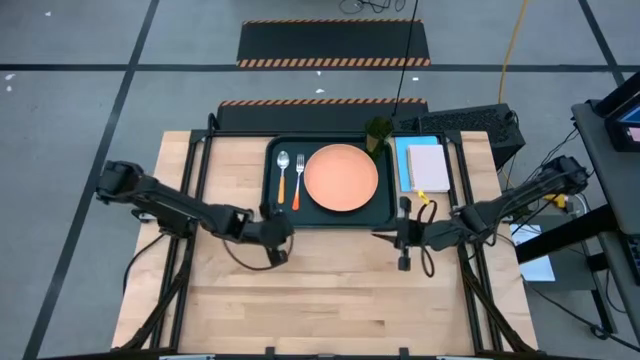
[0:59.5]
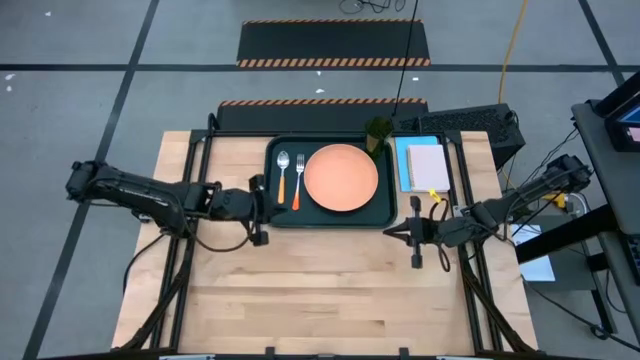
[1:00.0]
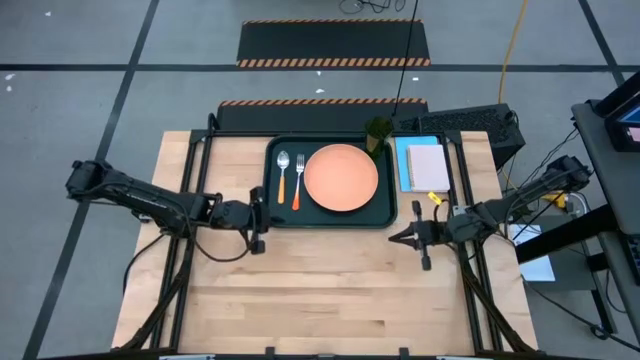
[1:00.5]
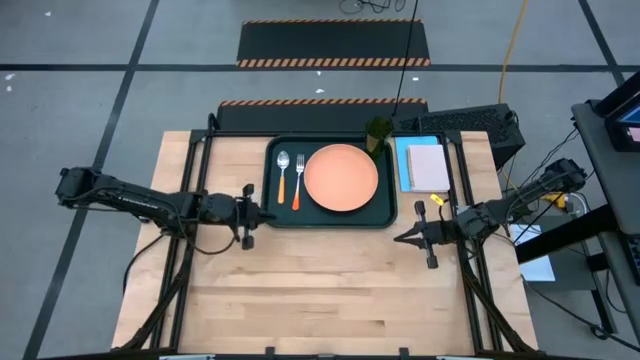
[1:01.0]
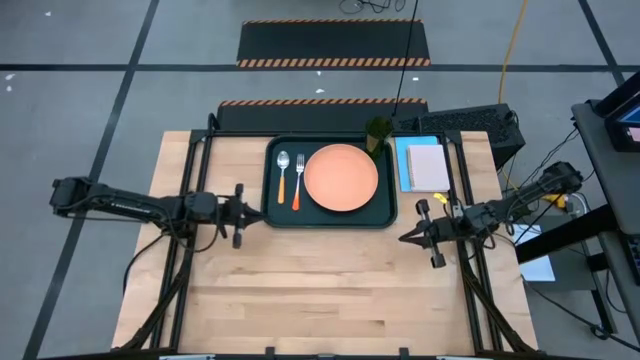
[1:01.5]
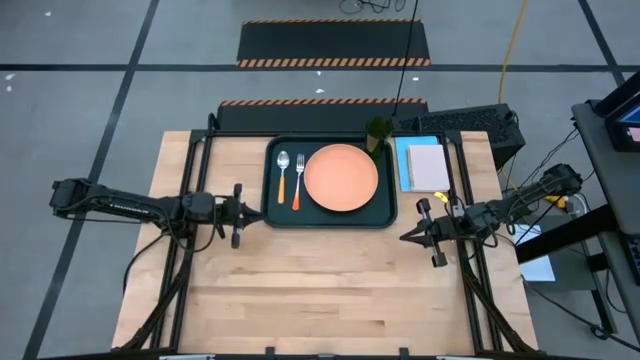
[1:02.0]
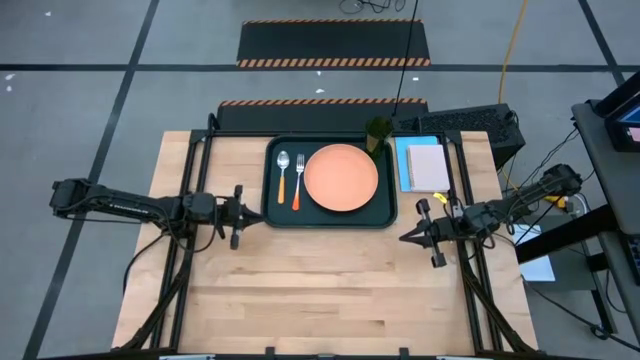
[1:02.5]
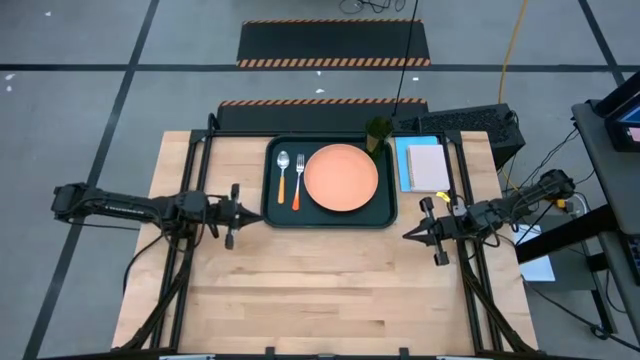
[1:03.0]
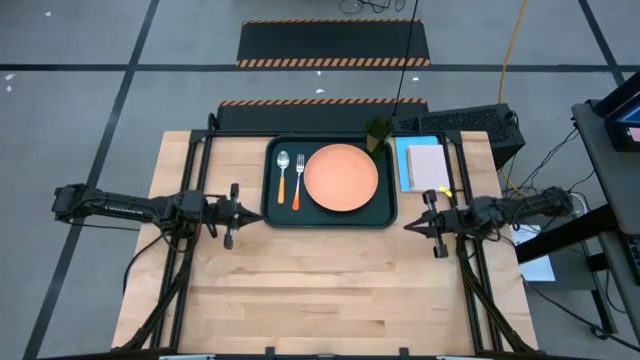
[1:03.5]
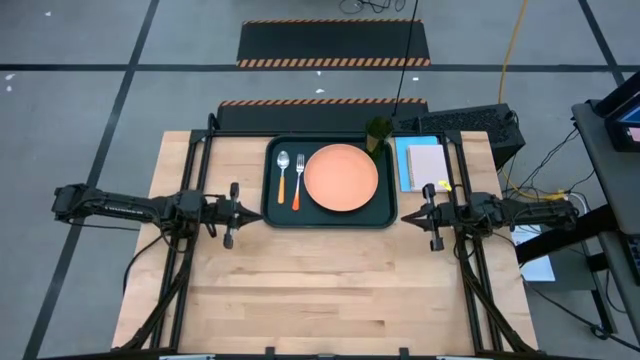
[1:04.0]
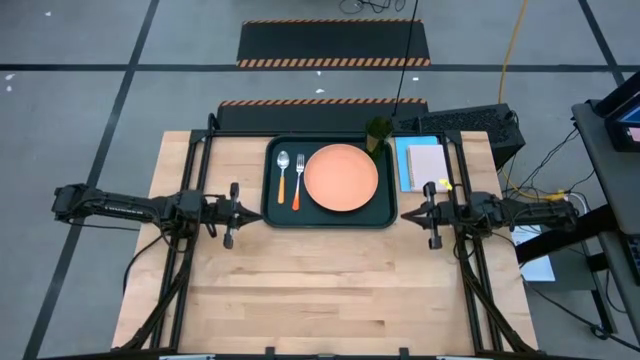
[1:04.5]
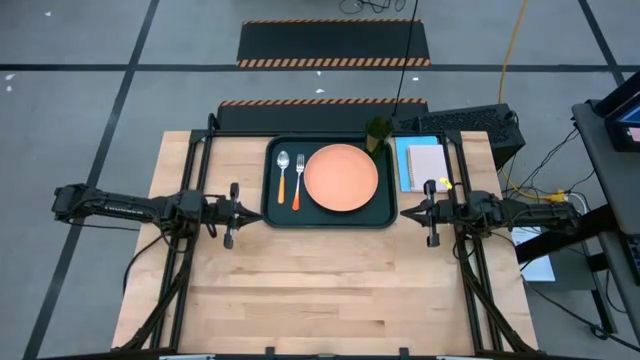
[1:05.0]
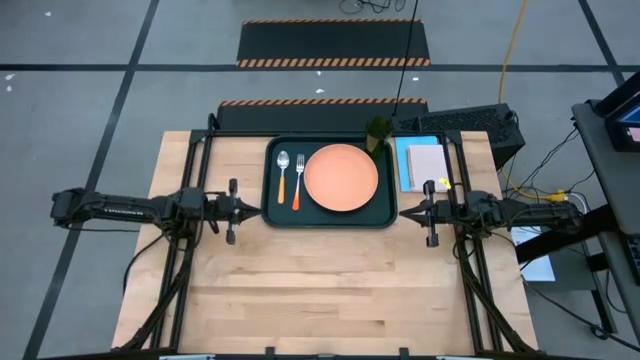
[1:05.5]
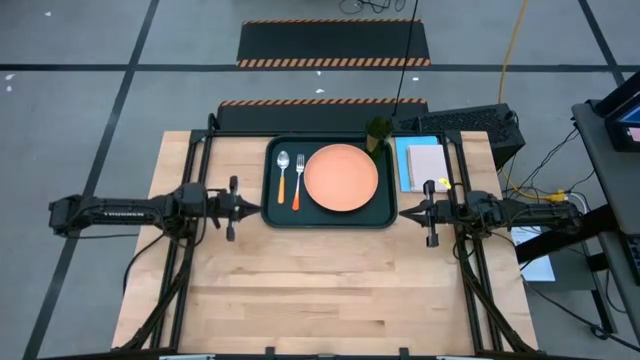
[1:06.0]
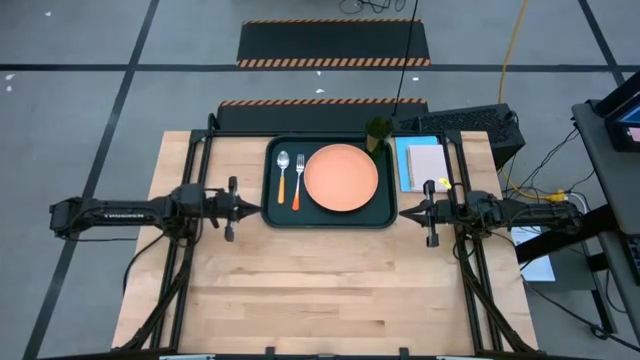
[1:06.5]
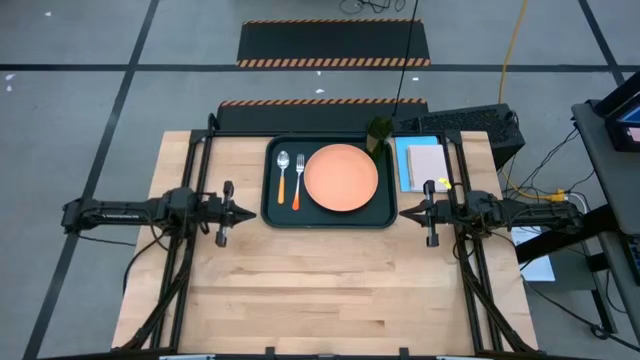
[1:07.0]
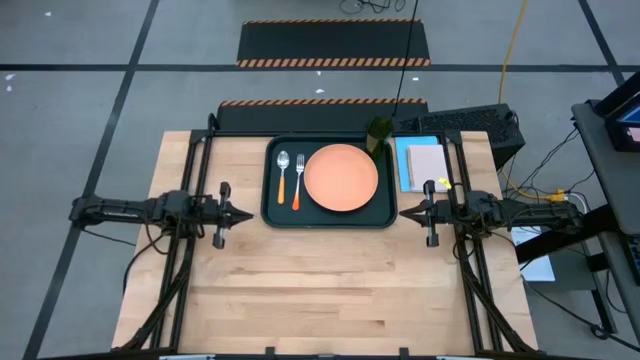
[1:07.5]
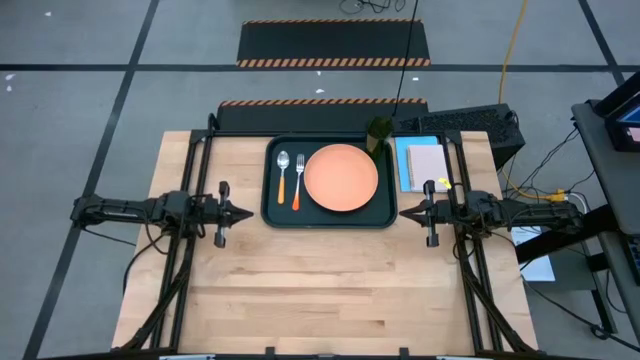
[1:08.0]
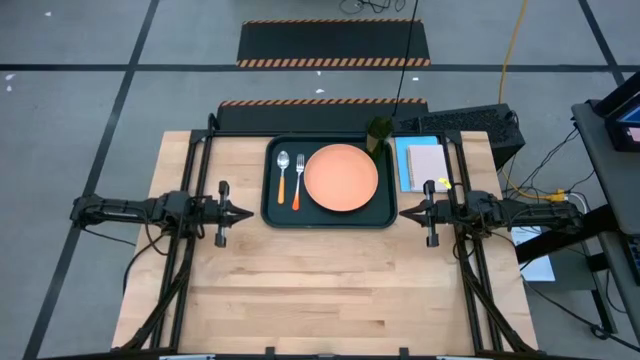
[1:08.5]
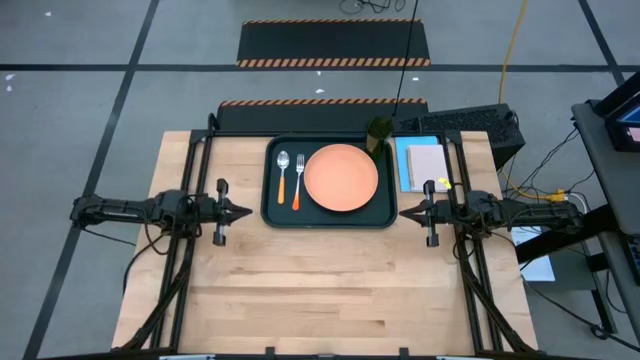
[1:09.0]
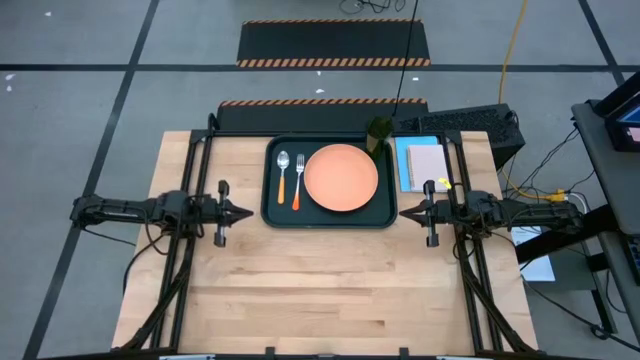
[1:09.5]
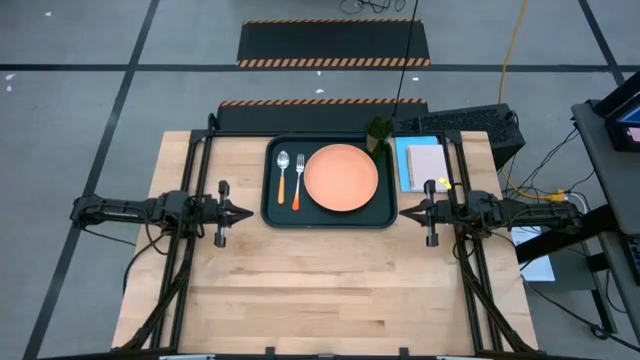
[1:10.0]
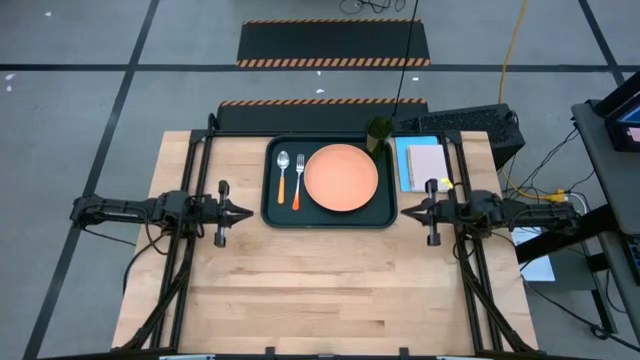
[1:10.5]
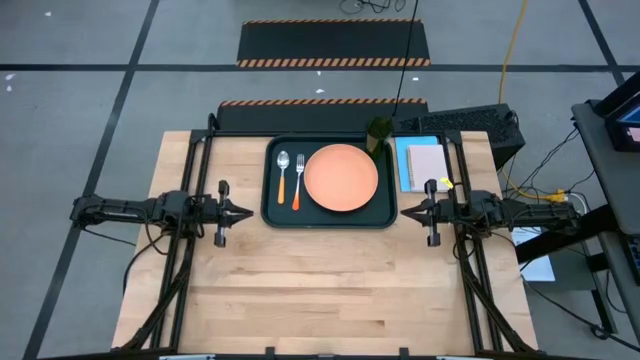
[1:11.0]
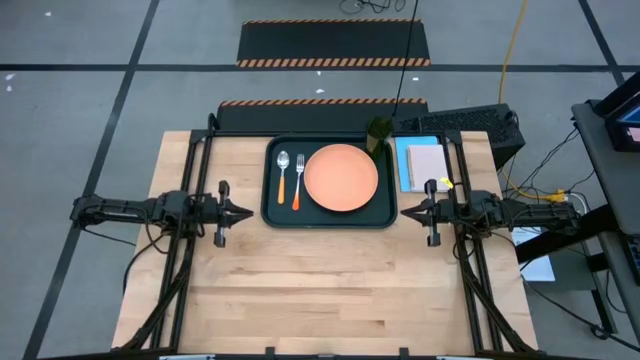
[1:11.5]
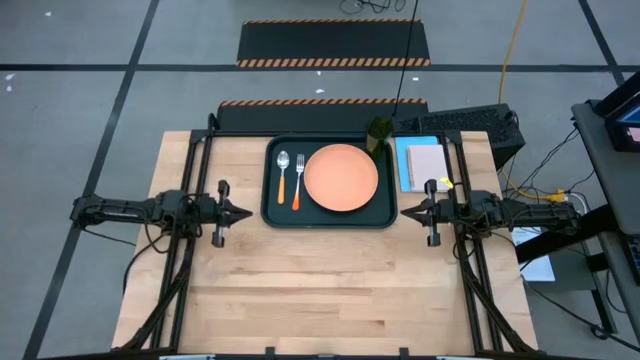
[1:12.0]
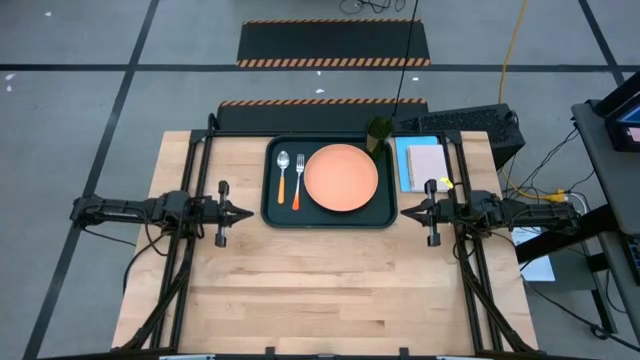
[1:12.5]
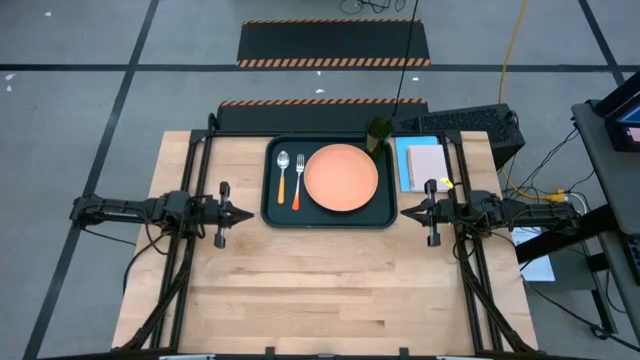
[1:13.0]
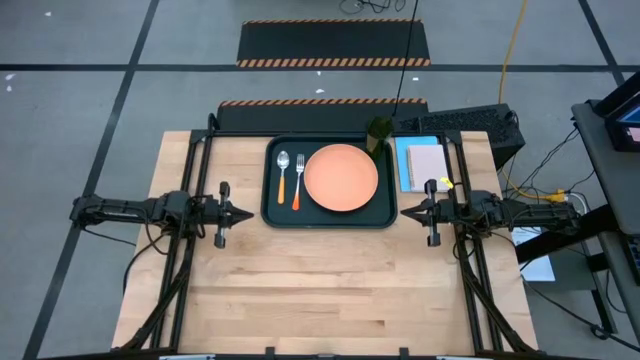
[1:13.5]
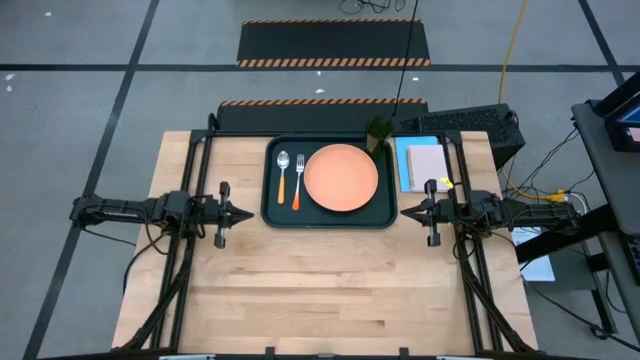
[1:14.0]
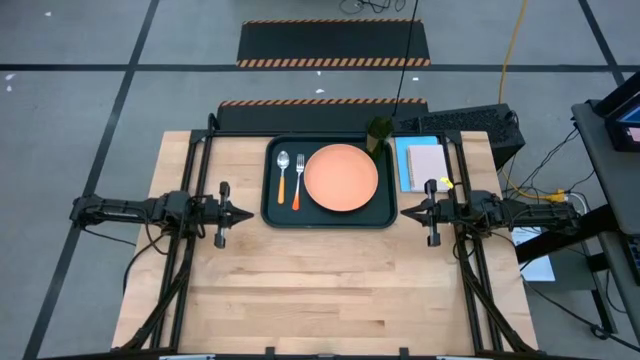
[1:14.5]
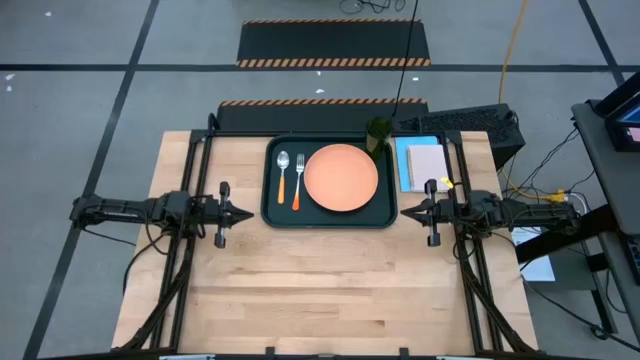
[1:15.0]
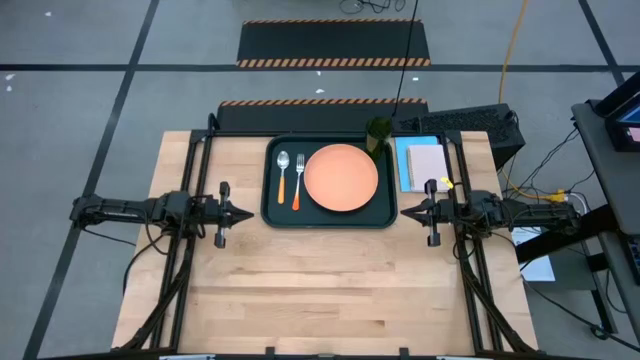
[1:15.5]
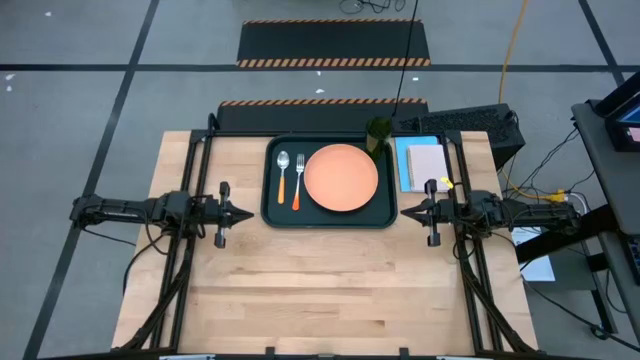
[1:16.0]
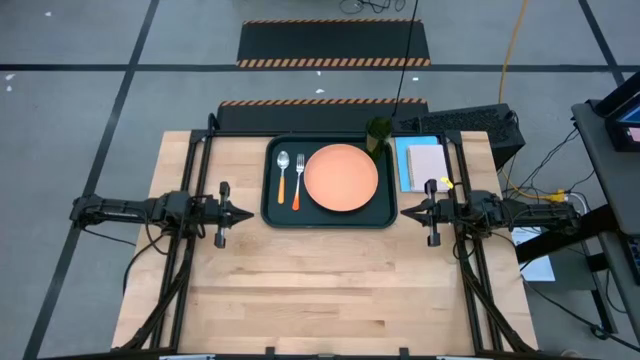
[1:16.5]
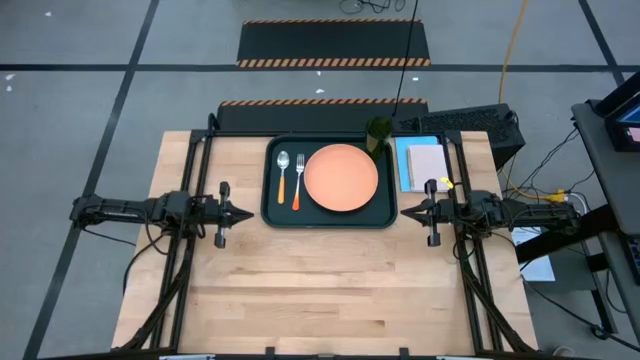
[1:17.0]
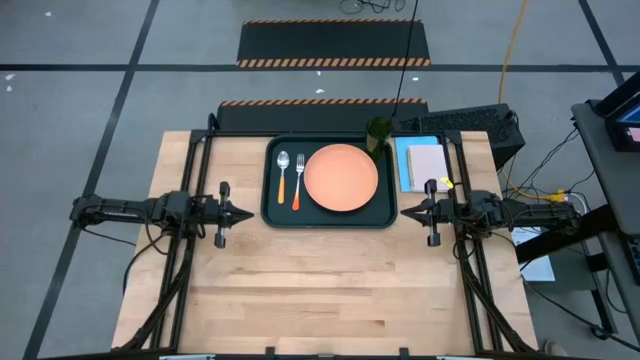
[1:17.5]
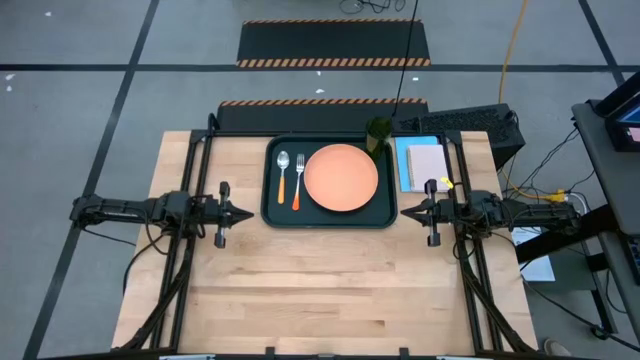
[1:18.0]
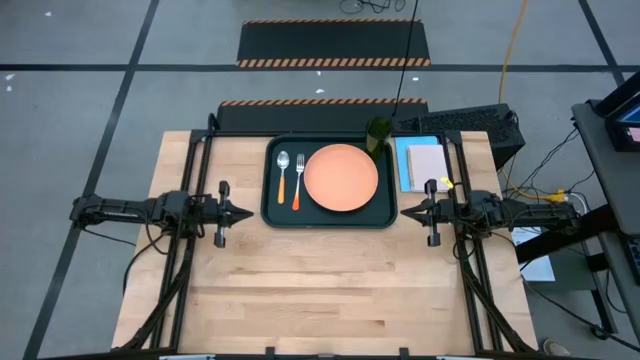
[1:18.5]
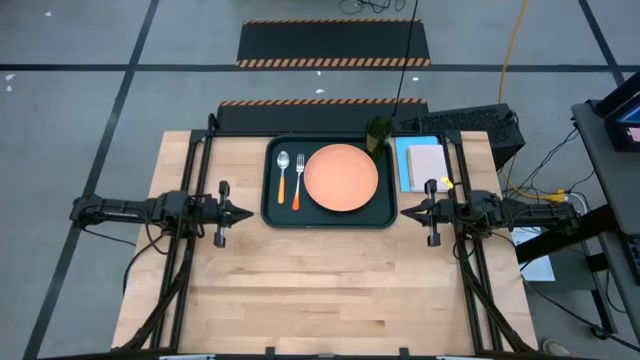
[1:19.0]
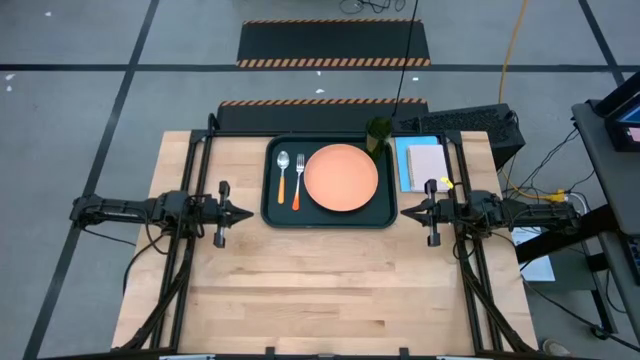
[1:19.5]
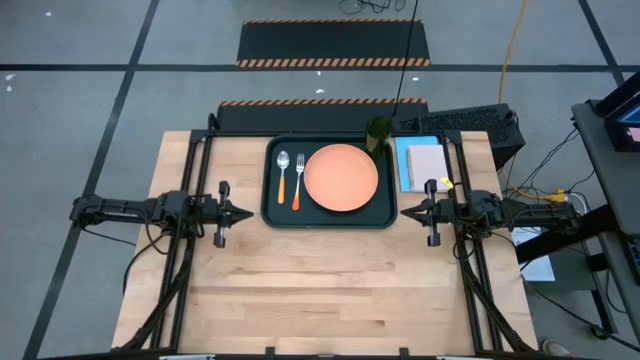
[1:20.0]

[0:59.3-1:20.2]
Task: Pick and place plate/cup/fork/spoon on tray
Return to Home Position
